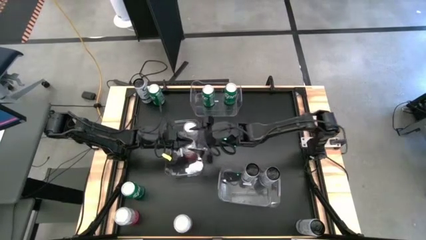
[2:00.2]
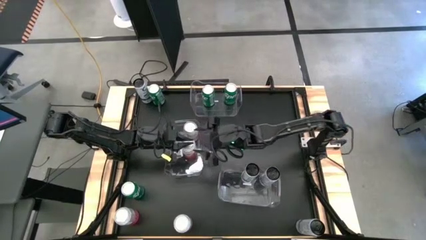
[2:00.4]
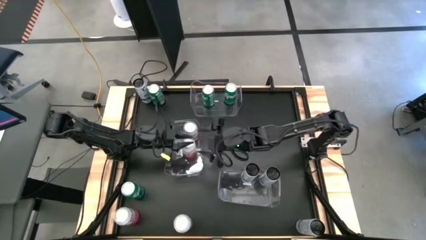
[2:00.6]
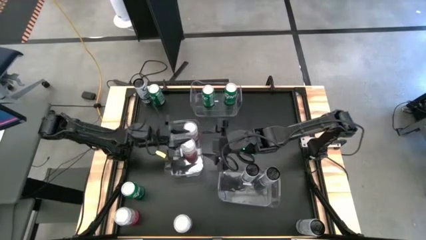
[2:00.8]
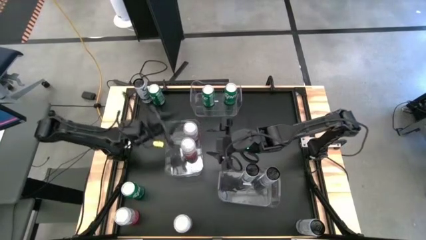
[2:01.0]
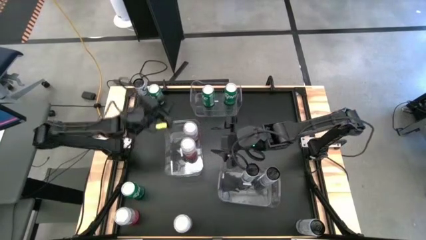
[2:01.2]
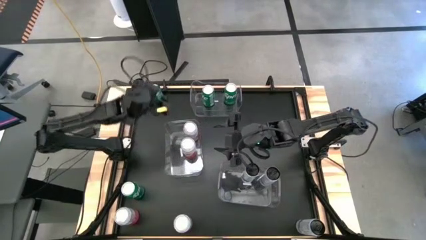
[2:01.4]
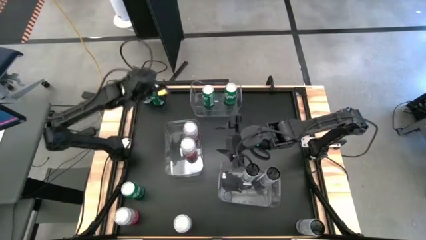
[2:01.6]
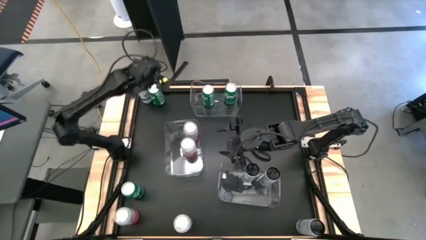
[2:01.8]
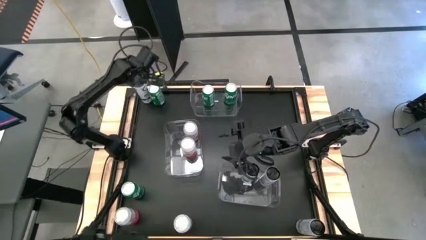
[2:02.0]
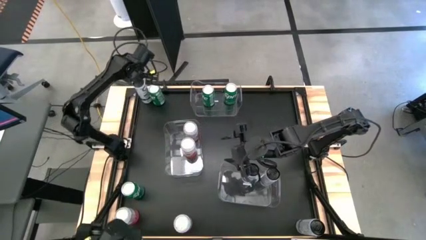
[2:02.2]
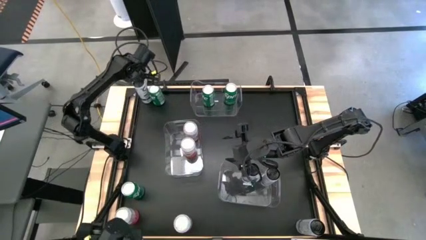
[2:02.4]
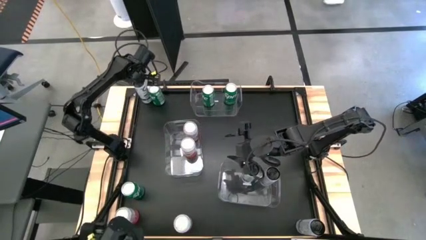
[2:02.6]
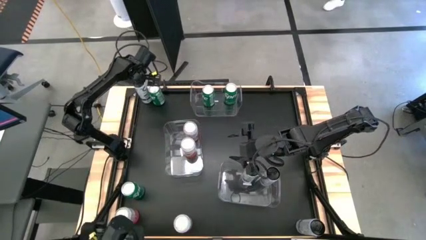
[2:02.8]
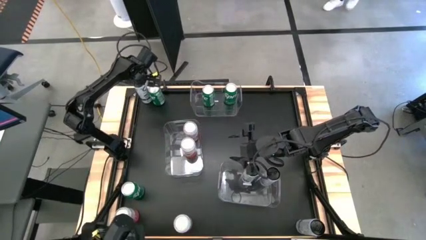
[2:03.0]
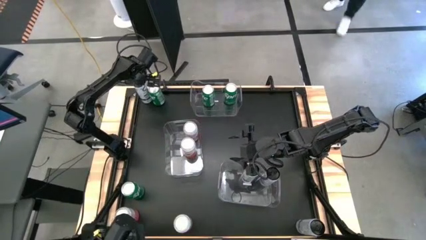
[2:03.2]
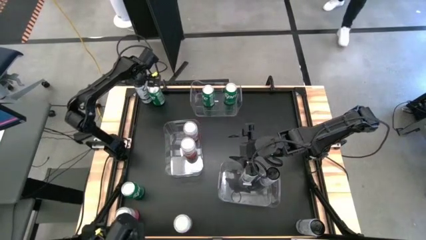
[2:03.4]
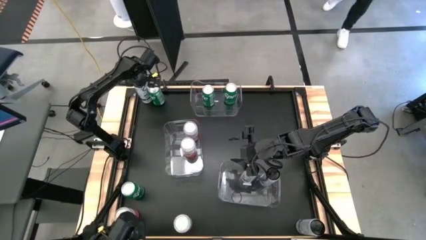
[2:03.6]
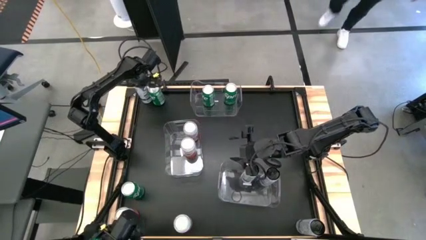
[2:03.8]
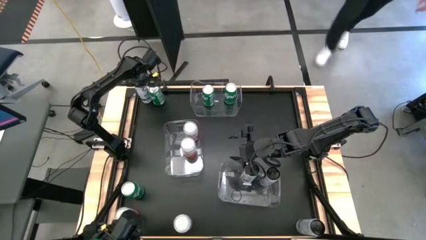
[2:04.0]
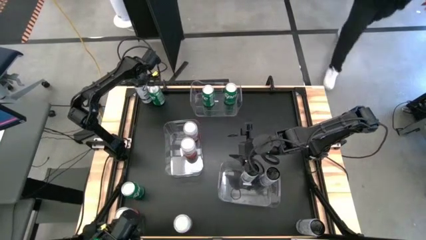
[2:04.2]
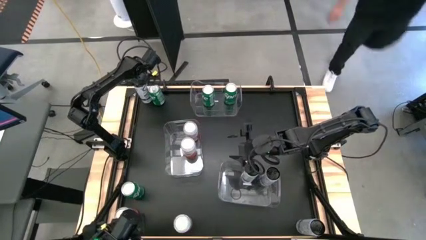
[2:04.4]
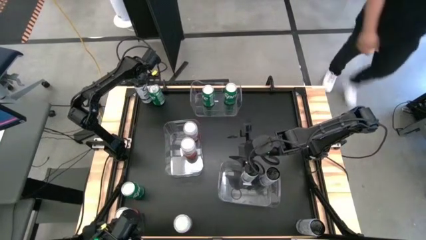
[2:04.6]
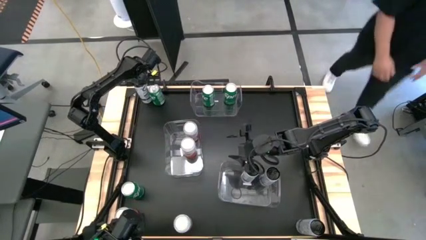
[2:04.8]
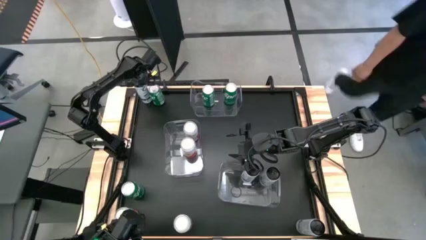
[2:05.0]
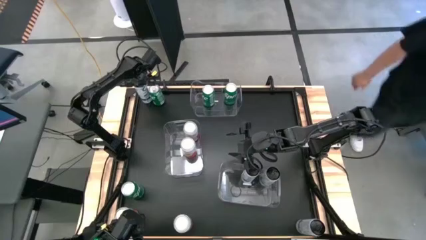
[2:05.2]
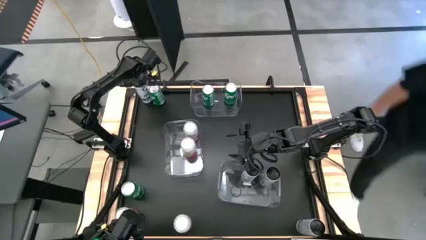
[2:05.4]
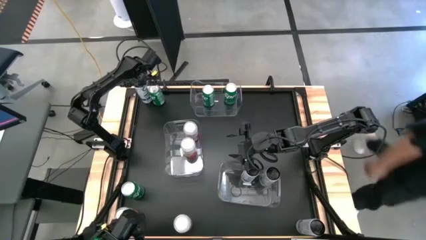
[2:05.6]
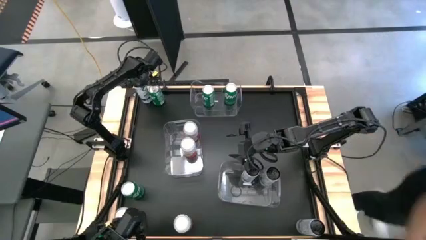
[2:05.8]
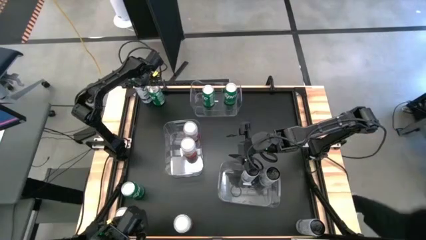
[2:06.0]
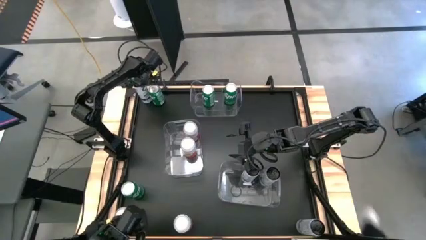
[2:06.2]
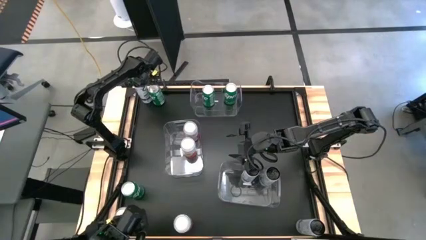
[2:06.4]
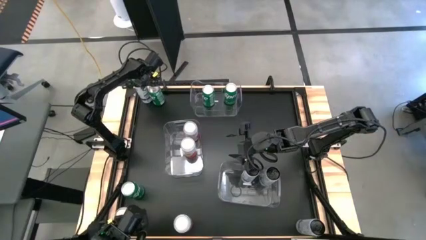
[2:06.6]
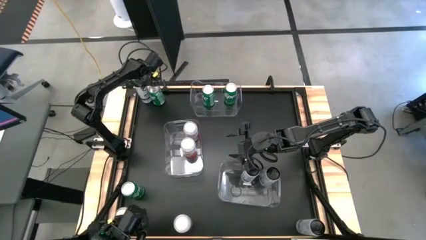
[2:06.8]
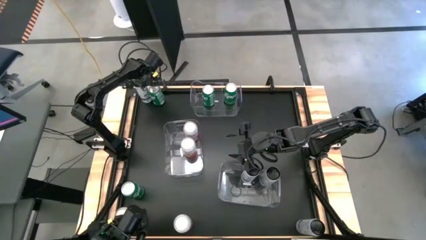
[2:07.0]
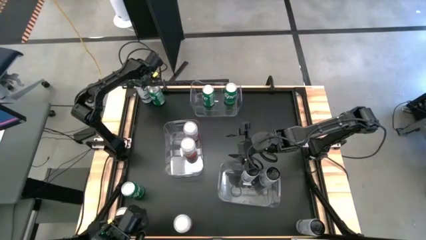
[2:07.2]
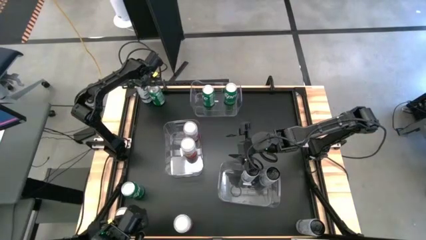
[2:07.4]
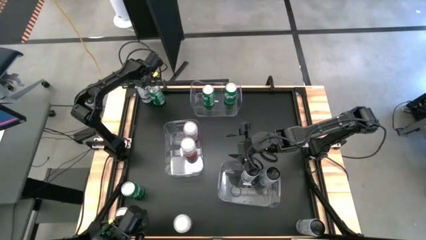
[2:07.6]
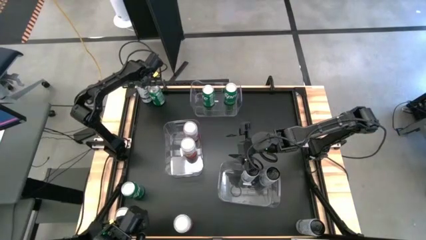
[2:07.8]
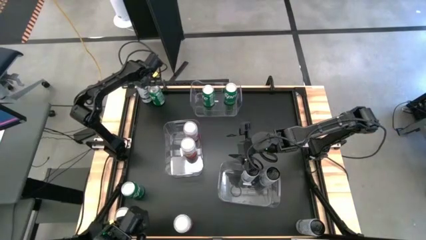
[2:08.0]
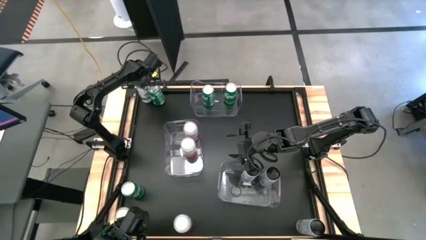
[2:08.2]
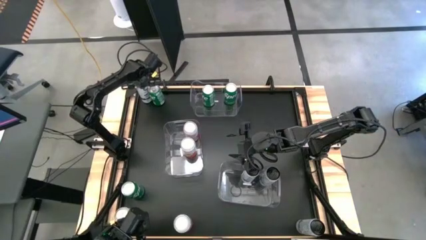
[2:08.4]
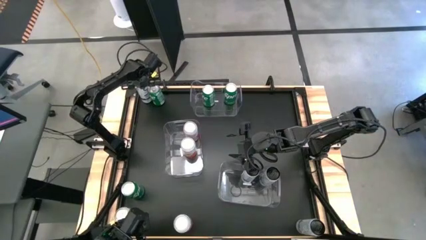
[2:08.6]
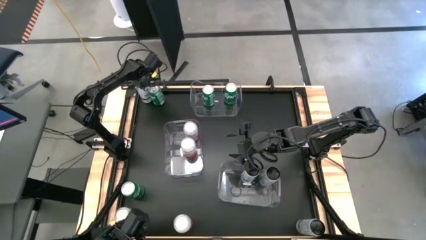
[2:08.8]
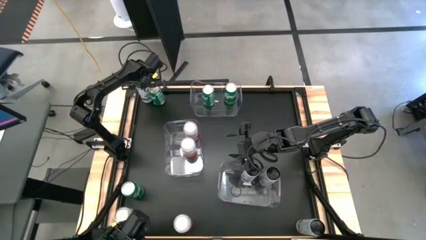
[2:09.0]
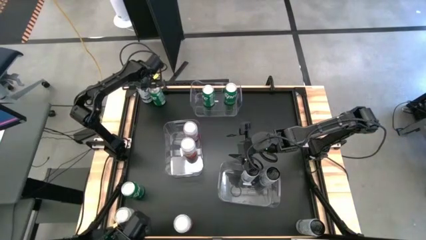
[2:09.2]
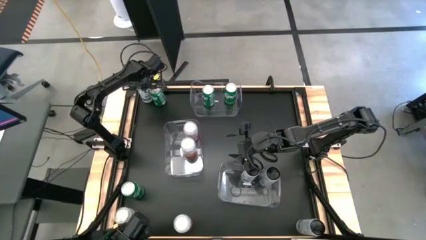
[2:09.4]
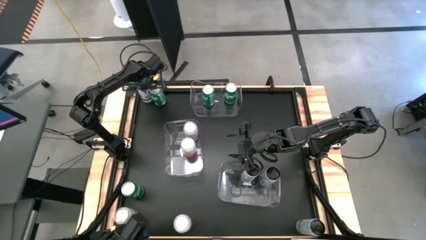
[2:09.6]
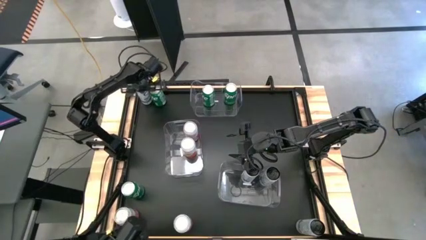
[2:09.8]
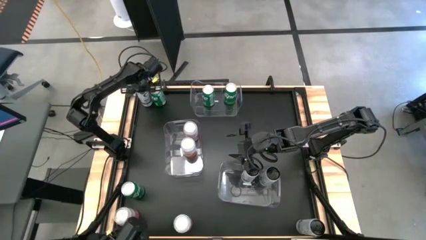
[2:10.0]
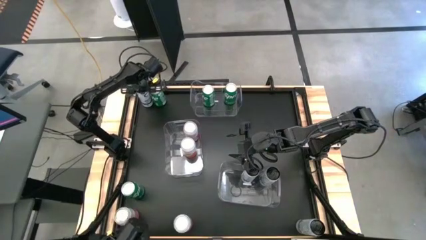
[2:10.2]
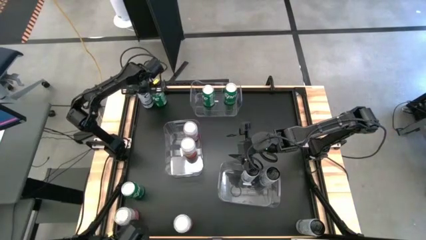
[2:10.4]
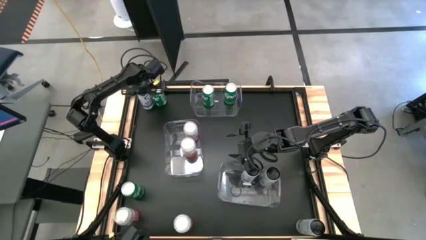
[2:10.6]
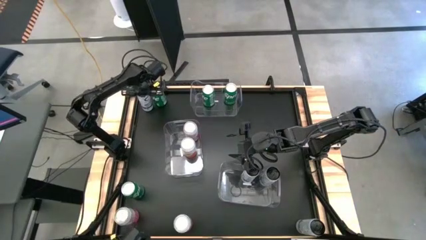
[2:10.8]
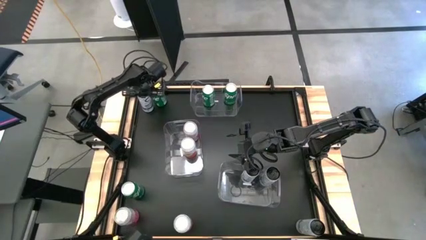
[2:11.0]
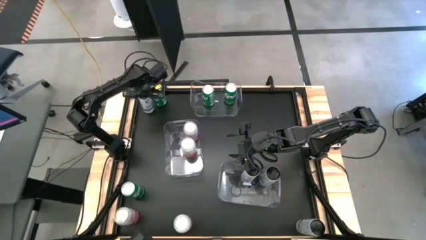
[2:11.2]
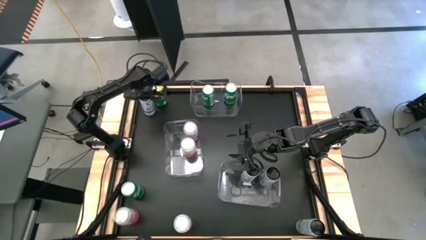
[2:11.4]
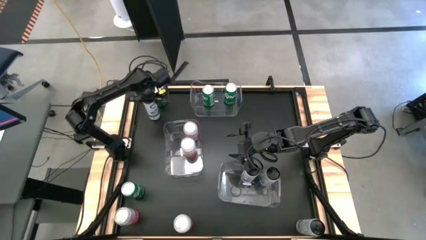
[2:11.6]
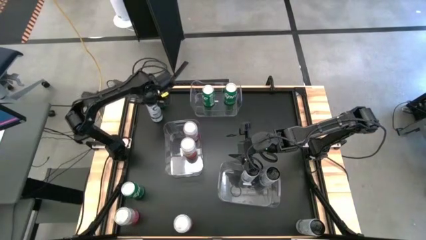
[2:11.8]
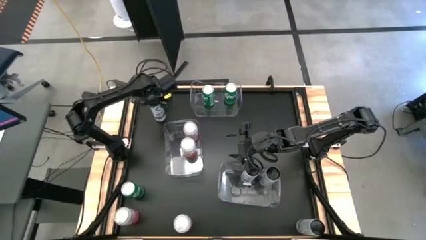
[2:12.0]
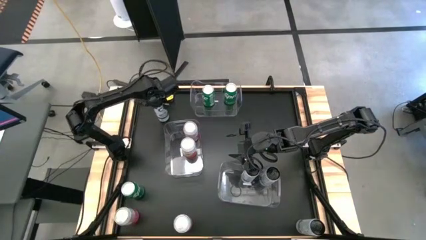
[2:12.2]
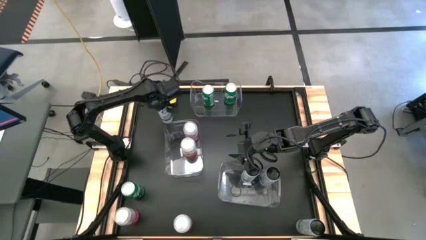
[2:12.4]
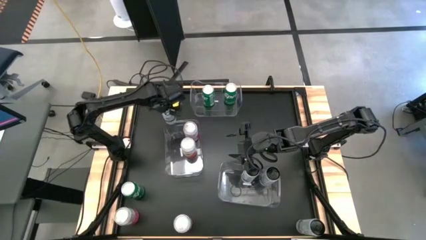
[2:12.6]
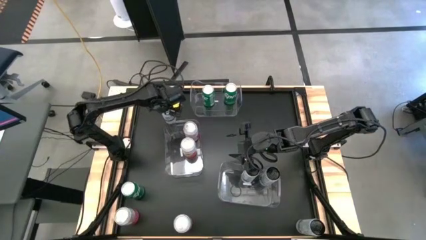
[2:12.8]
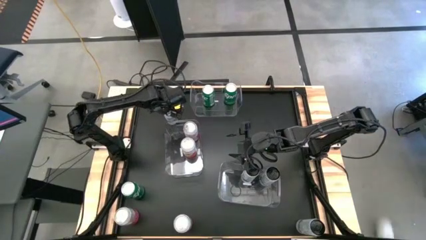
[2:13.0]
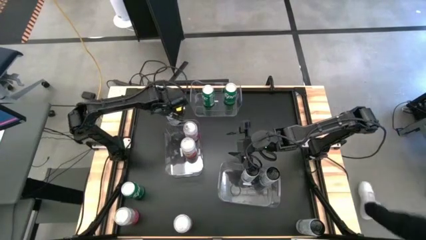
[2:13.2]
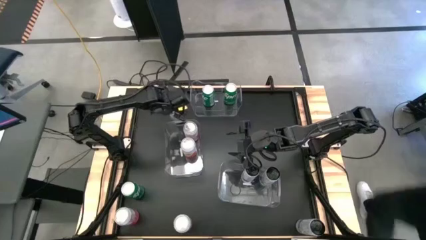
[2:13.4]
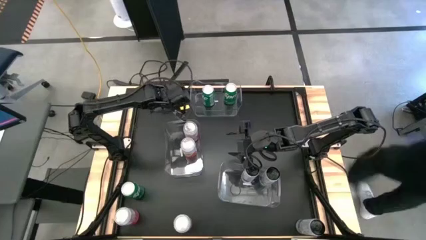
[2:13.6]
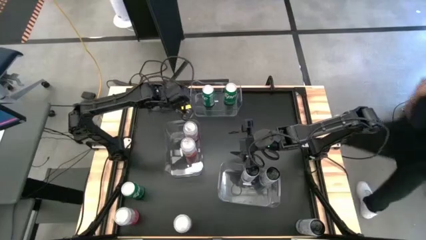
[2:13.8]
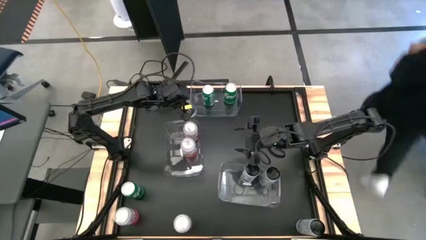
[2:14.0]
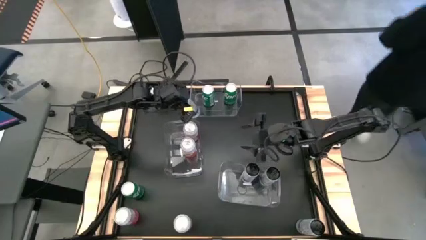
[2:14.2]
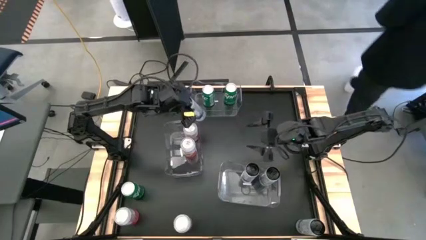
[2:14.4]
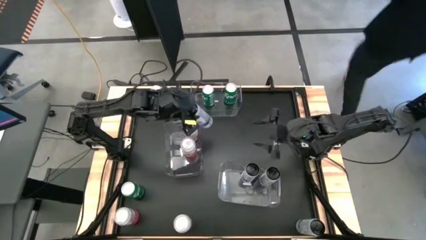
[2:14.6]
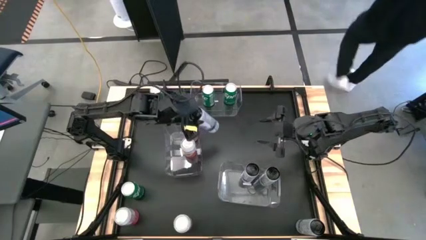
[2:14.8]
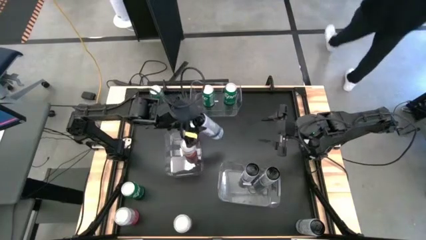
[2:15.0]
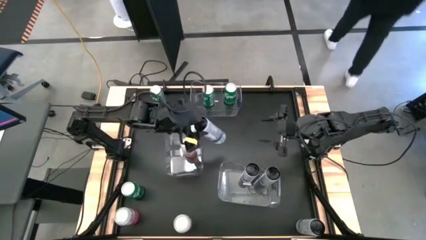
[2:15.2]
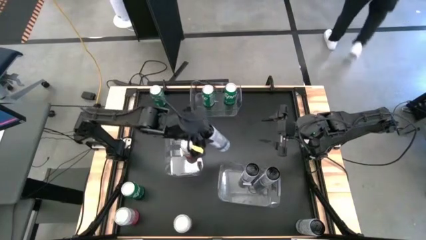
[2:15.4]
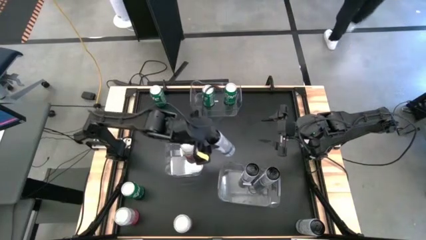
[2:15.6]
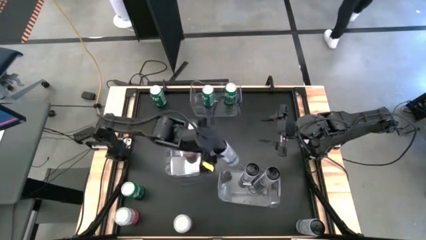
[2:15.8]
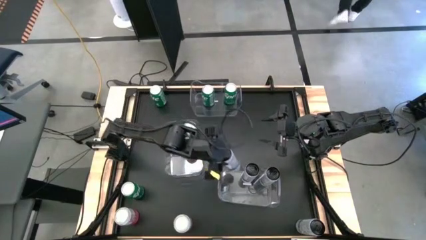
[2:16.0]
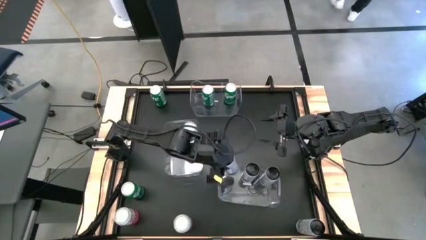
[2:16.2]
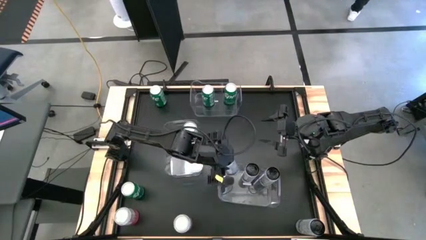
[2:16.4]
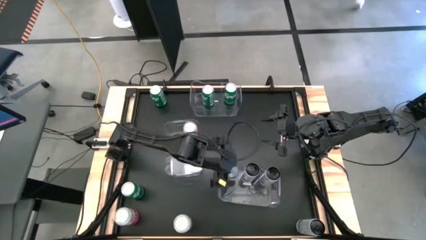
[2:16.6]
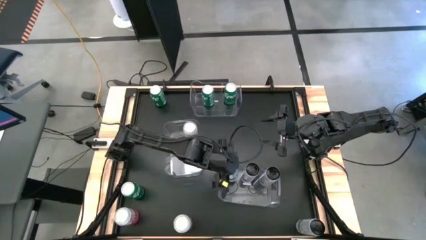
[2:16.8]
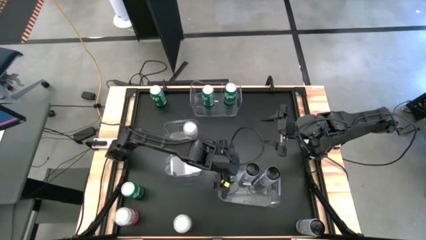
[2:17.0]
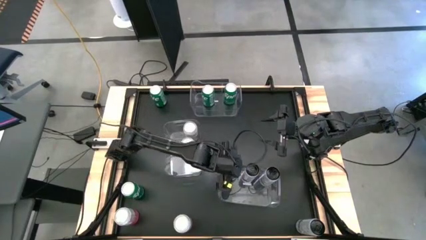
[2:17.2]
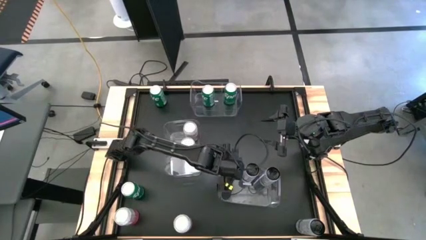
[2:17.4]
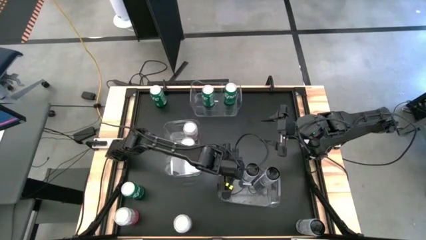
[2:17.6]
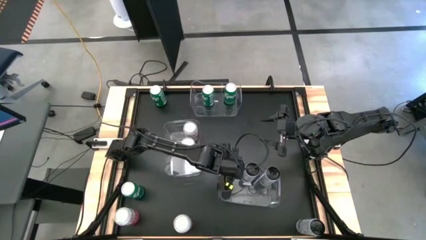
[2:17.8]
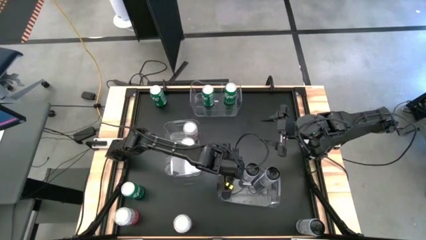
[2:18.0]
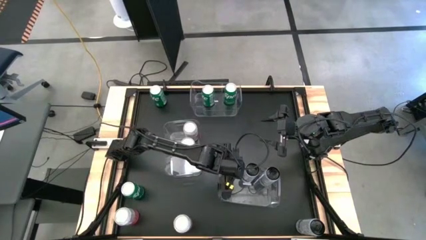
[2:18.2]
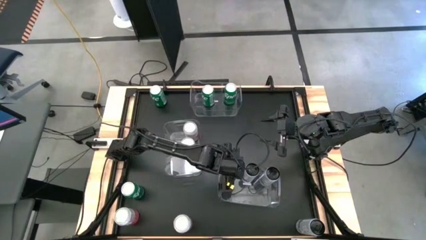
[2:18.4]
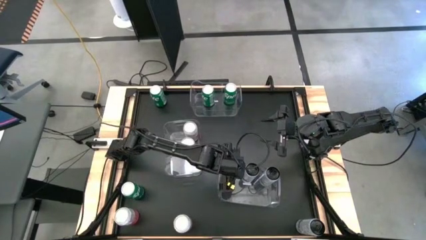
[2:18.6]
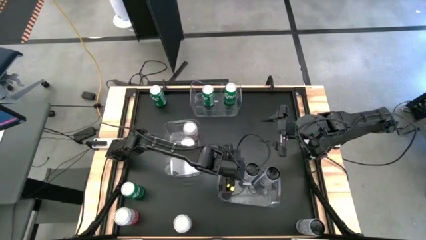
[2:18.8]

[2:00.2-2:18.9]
Task: Sort soda cans
Put the white soda can into the bottom transparent bin
